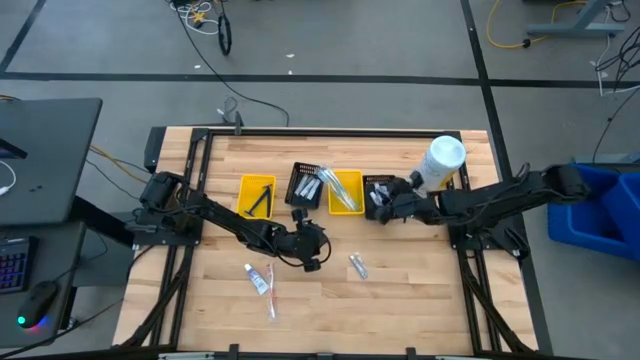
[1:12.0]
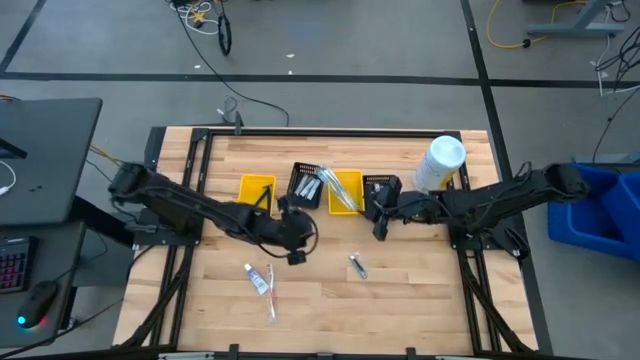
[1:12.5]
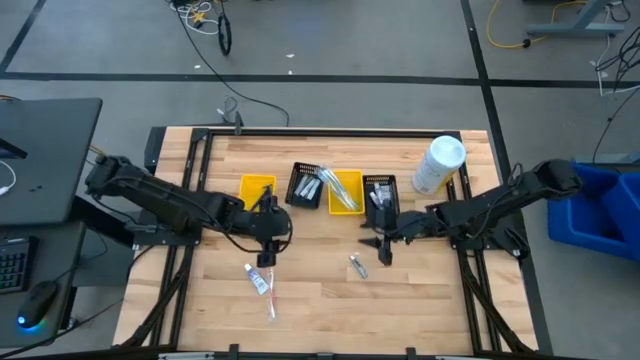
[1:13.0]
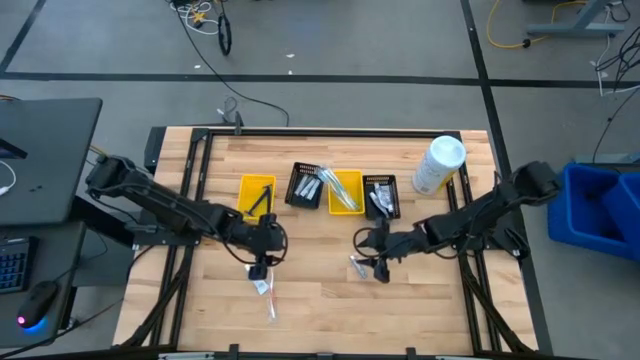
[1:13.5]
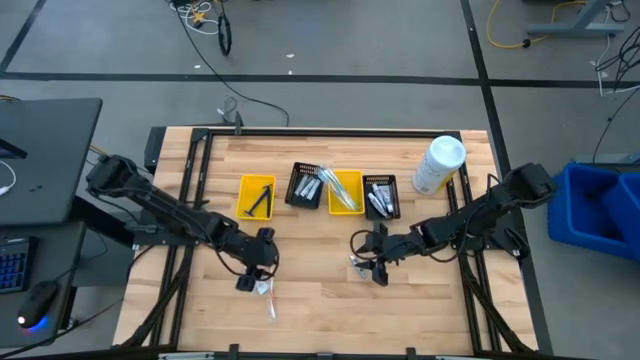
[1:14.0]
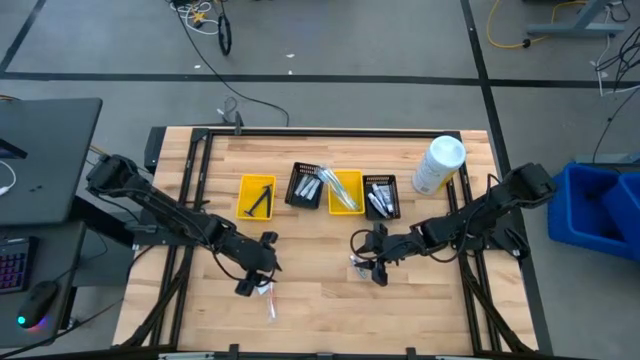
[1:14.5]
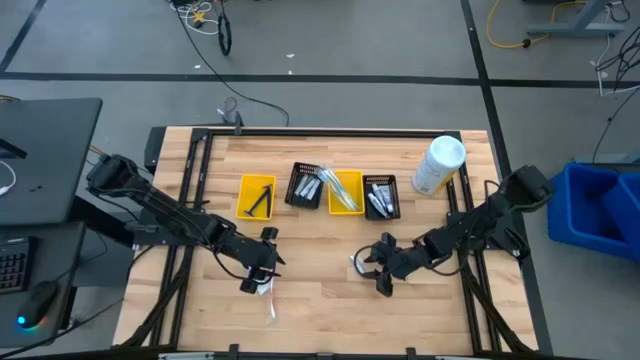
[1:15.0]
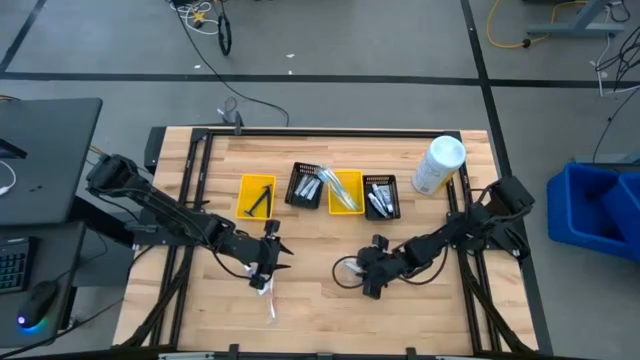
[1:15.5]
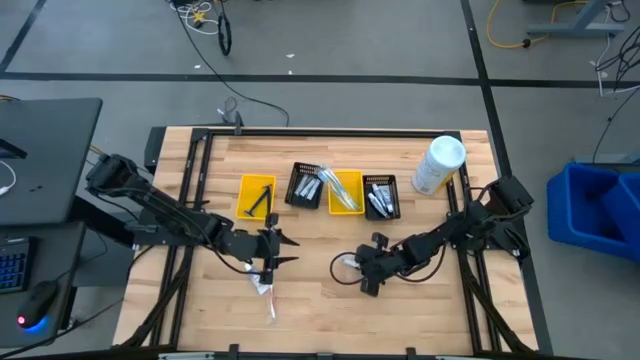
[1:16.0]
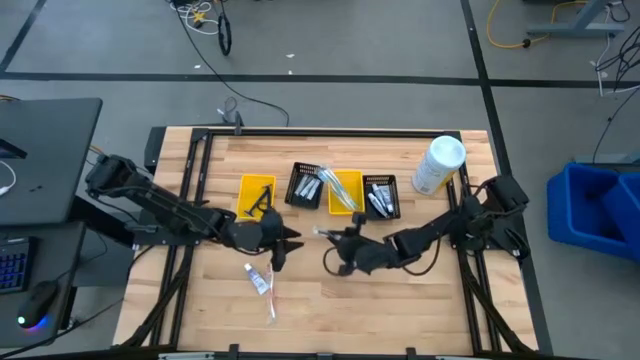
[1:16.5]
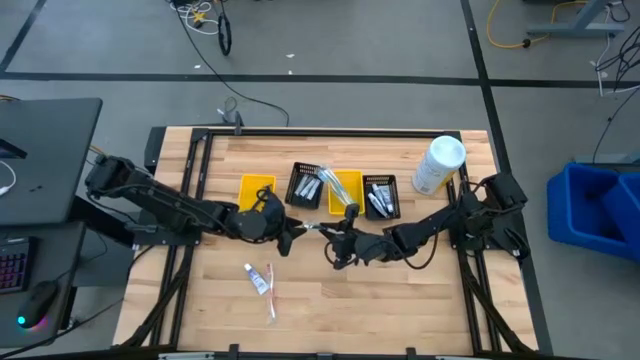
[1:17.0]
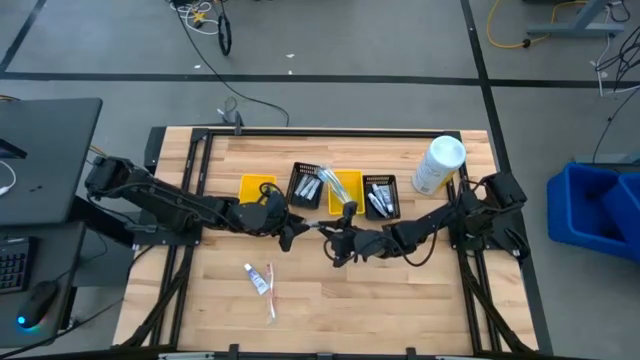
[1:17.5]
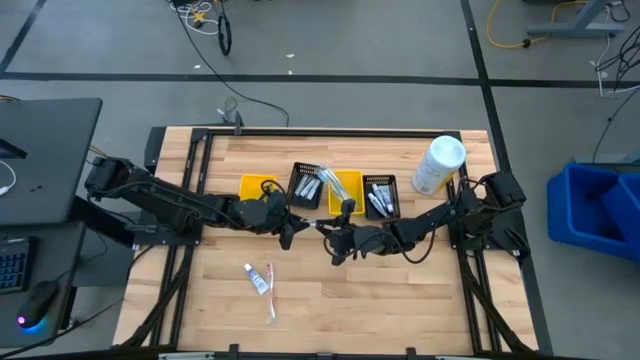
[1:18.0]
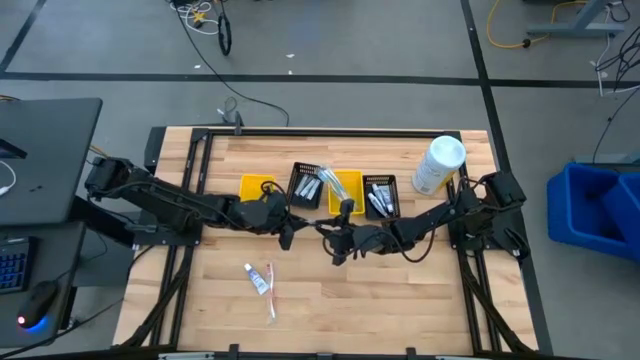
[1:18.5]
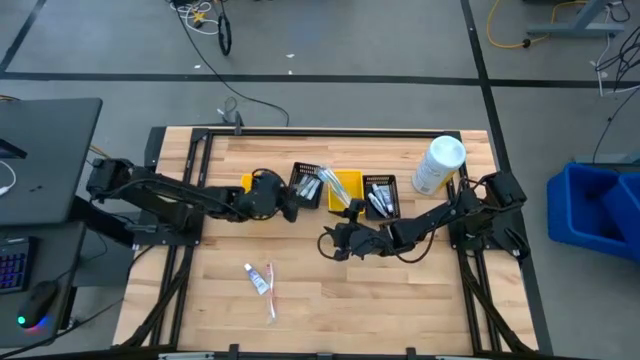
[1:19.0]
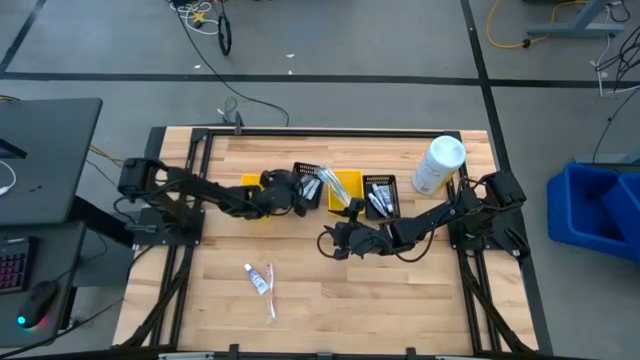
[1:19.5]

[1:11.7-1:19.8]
Task: Pick & Place Travel size toiletries
Put the silver nail cutter into the left black bin

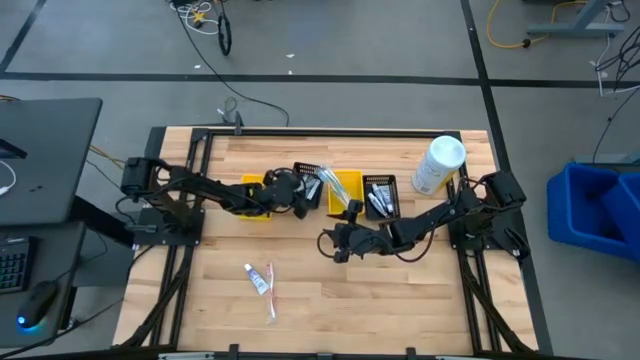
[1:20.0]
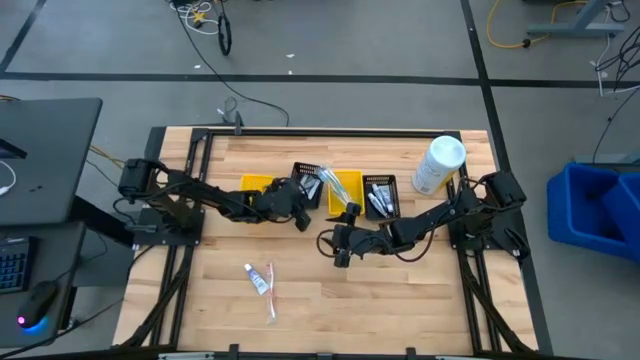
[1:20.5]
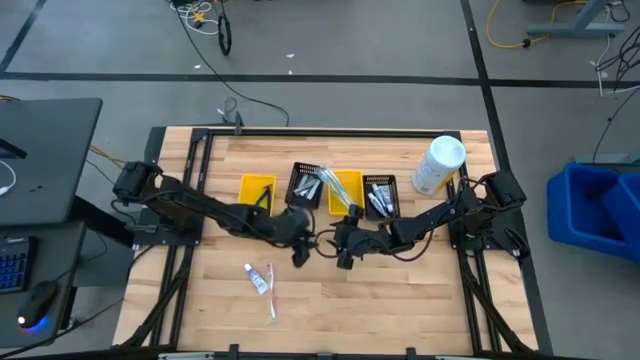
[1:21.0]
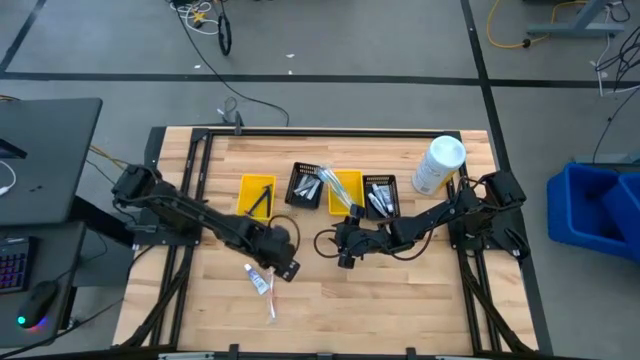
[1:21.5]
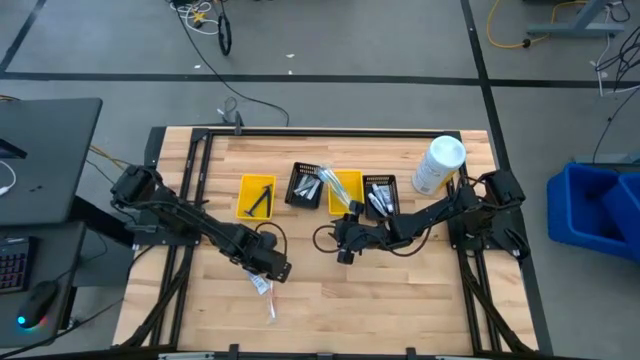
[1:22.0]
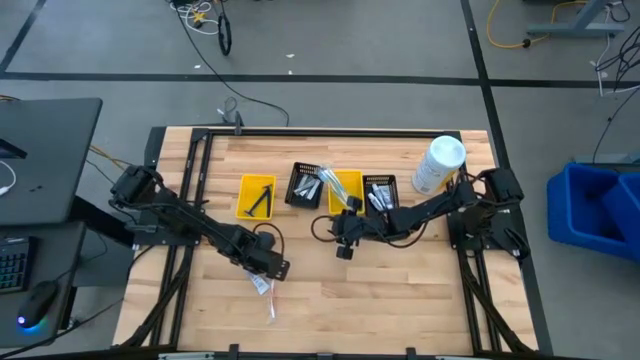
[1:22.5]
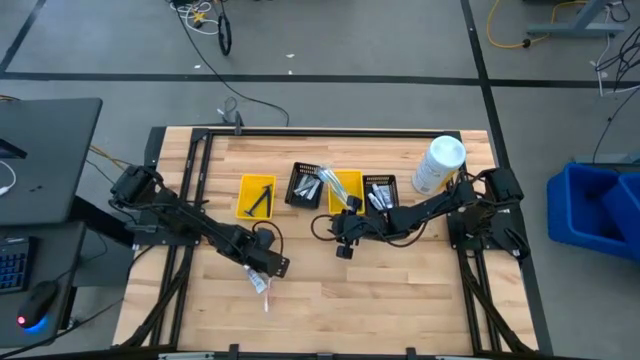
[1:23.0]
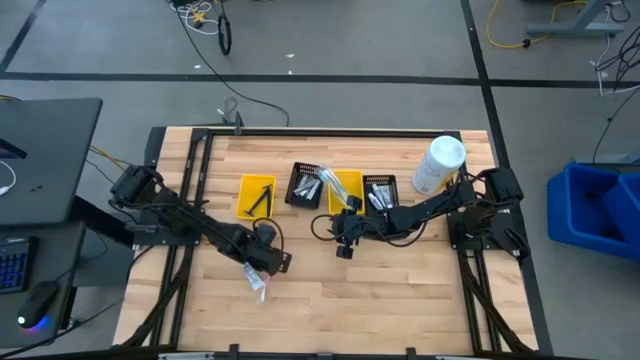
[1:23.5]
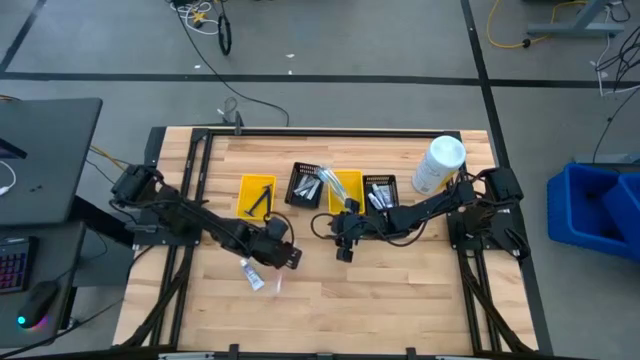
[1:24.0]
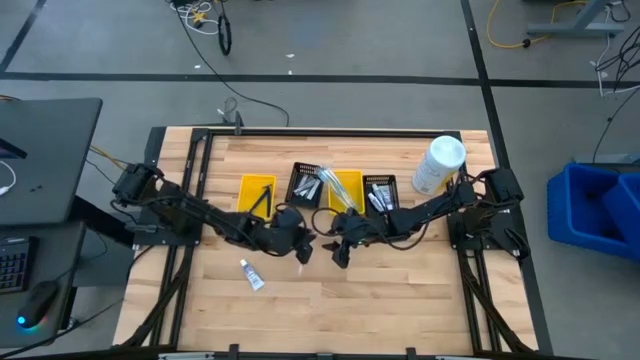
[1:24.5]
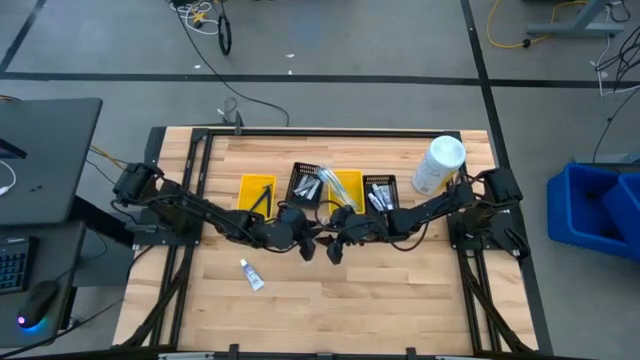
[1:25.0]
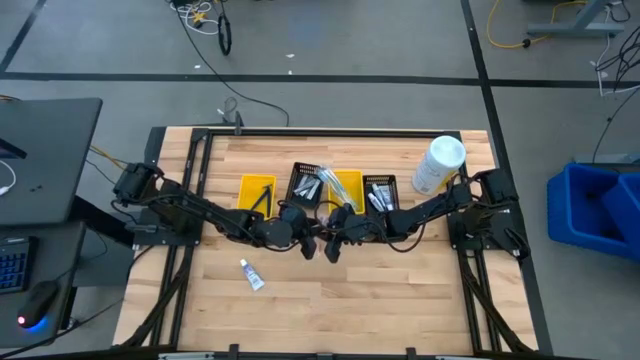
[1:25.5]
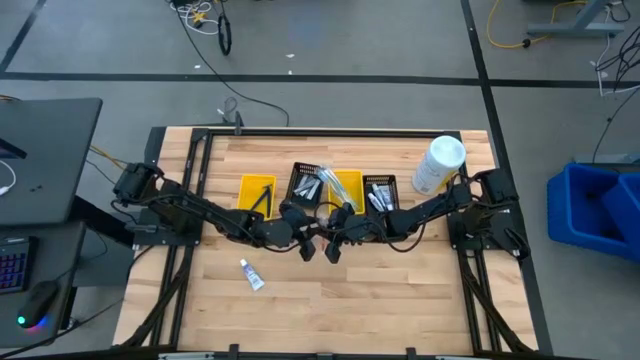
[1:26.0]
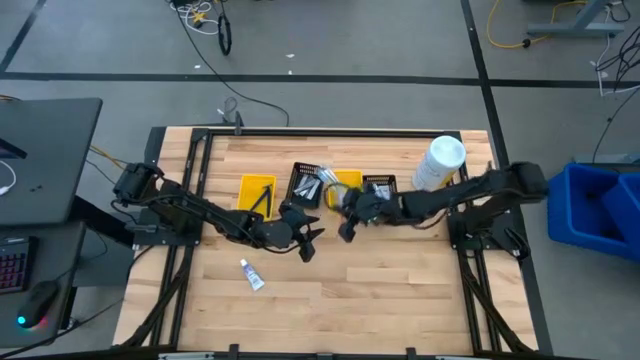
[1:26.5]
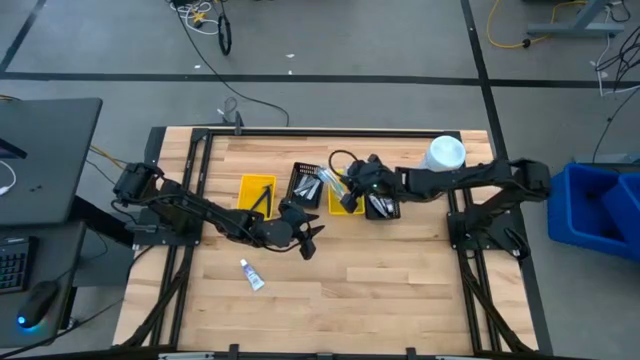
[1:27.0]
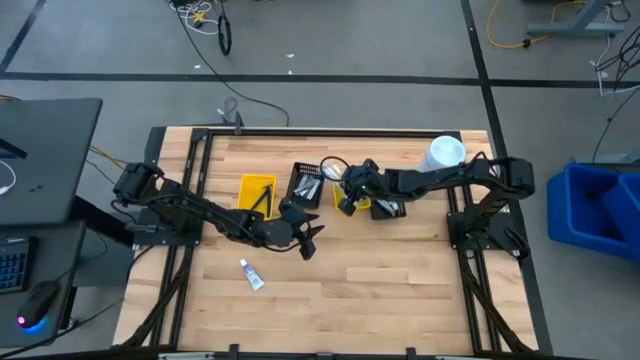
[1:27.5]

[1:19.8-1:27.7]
Put the orange toothbrush into the right yellow bin

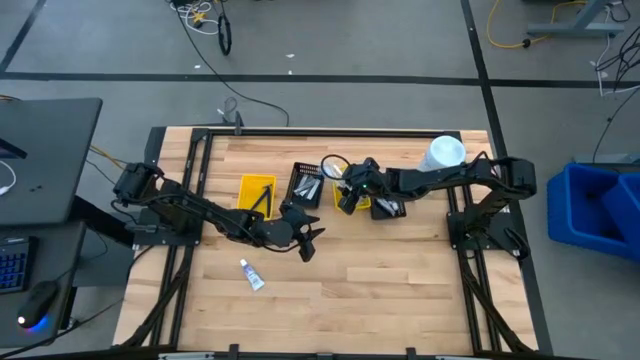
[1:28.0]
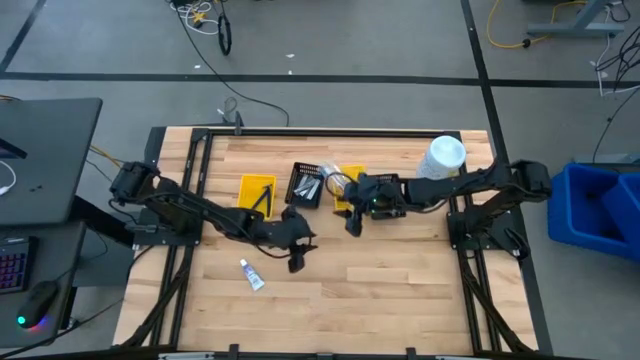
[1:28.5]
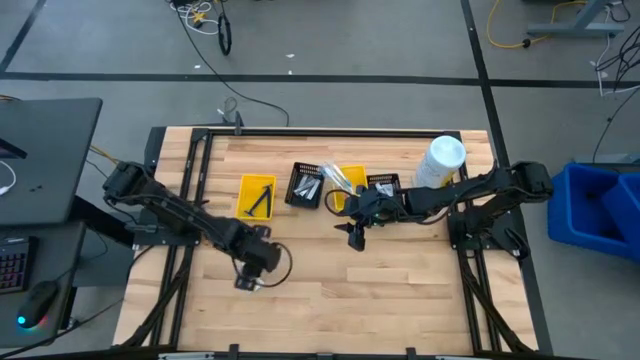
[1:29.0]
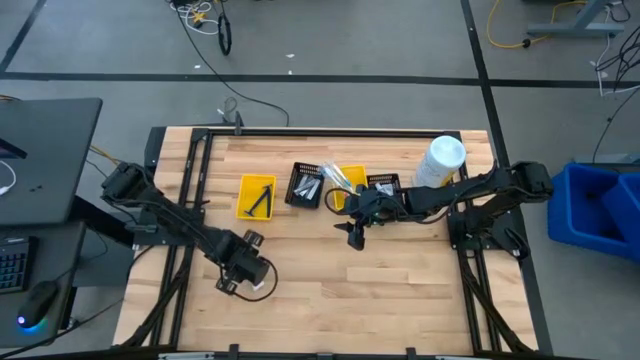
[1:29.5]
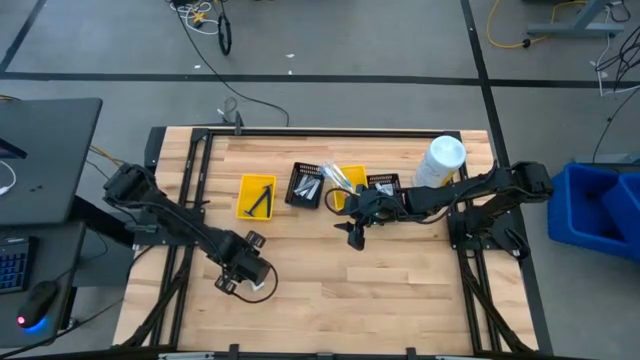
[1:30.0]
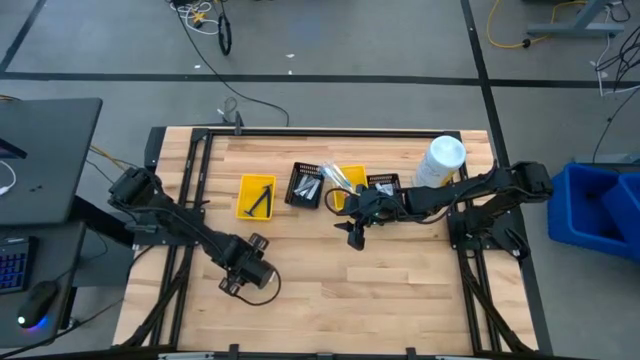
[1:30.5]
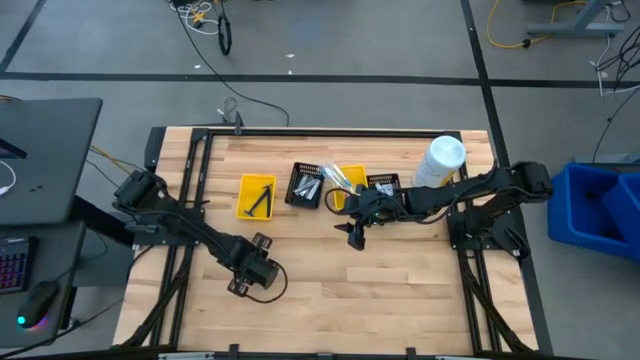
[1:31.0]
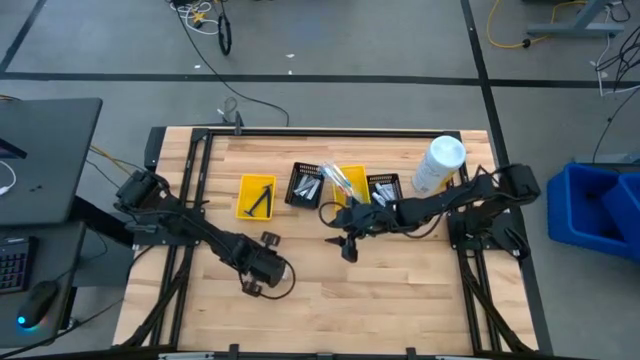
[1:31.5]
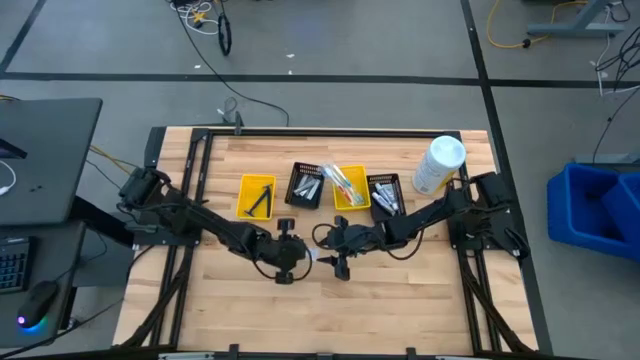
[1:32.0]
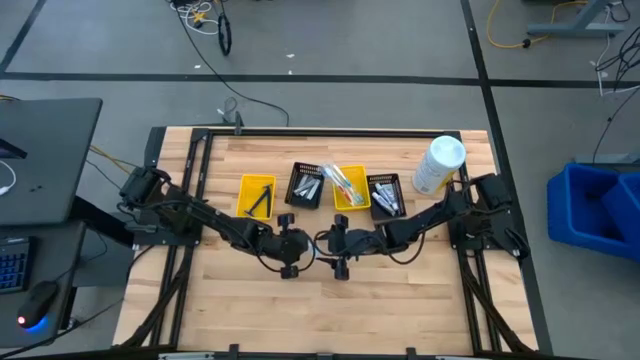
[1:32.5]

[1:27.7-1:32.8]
Put the violet toothpaste into the right black bin

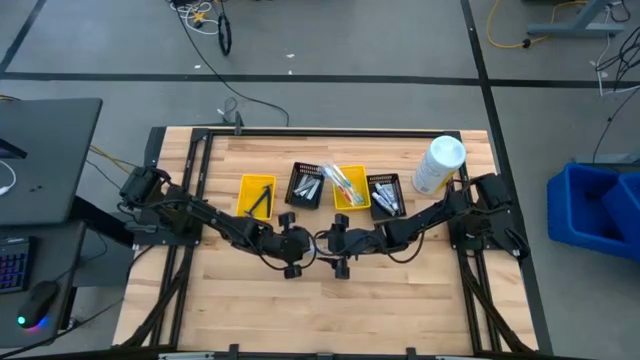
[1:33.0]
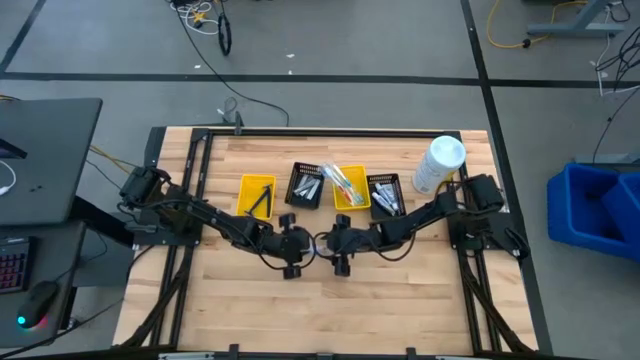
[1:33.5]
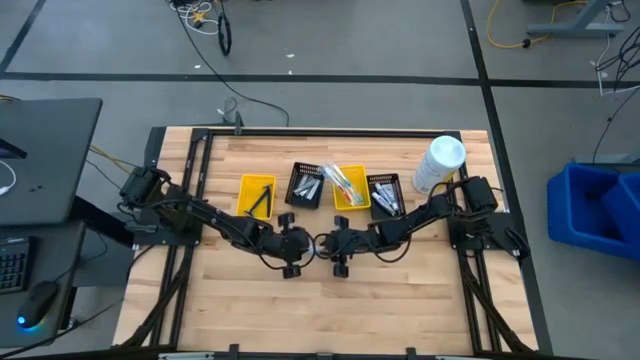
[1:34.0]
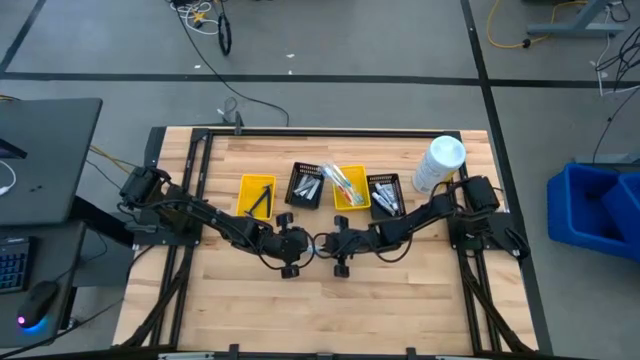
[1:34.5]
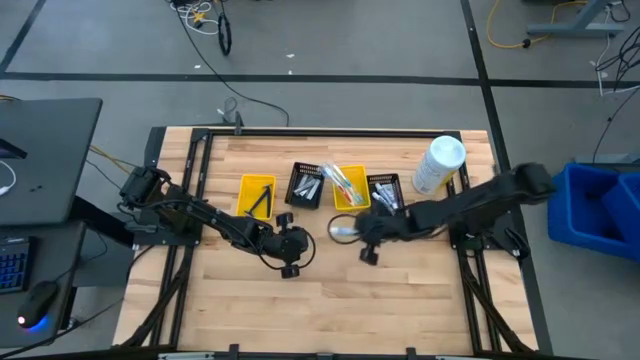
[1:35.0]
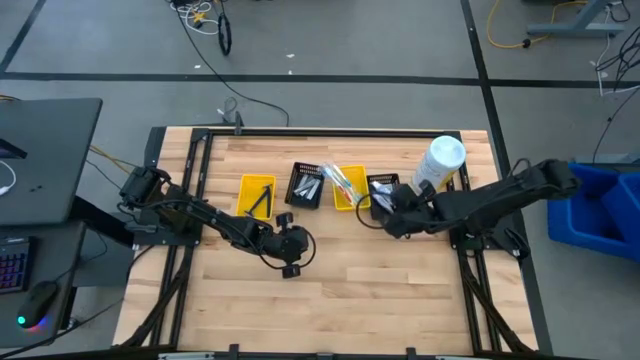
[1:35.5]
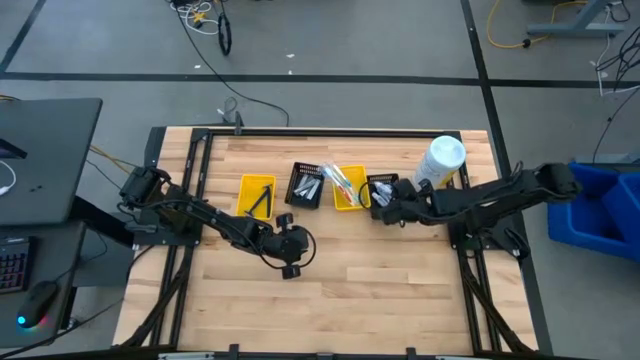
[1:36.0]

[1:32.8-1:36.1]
Put the violet toothpaste into the right black bin
